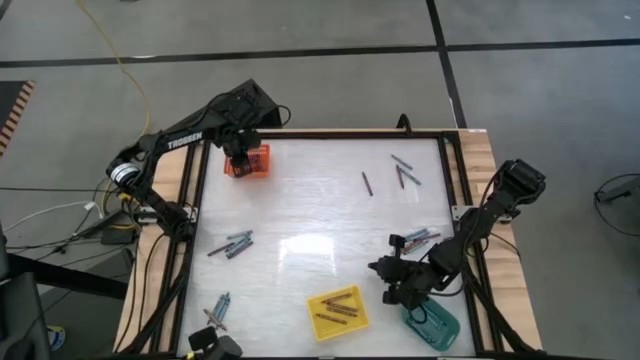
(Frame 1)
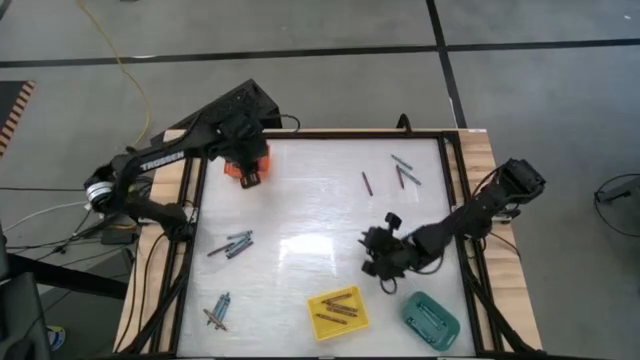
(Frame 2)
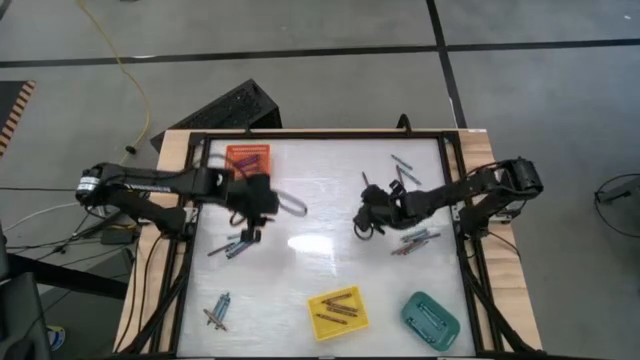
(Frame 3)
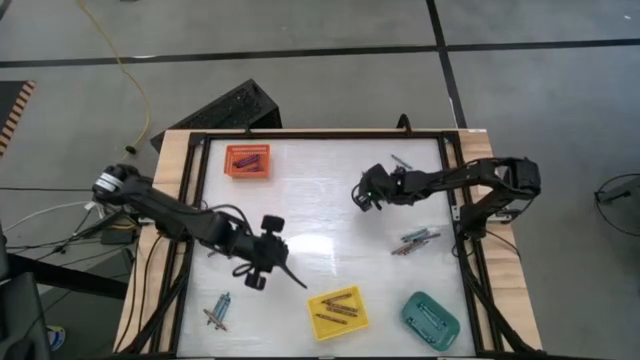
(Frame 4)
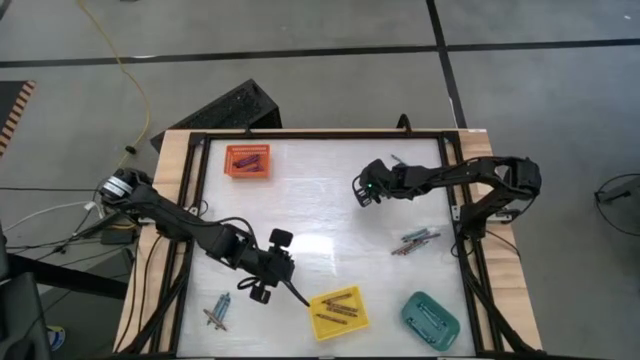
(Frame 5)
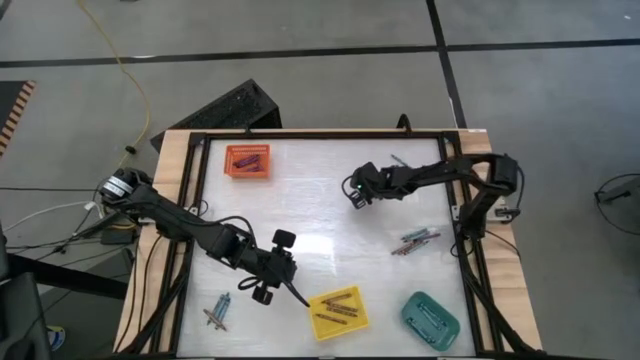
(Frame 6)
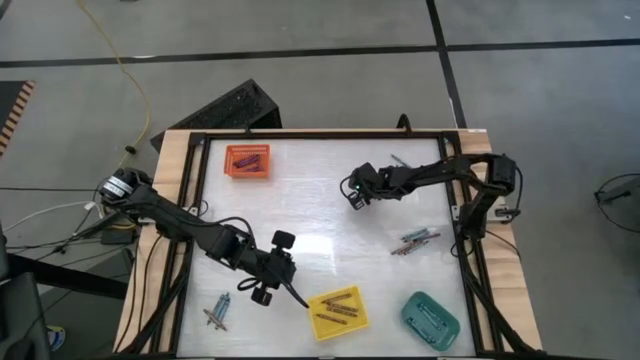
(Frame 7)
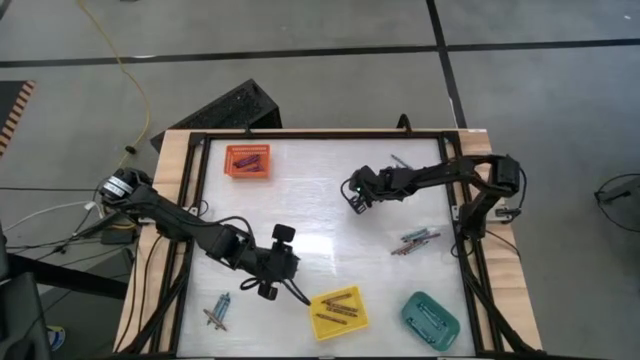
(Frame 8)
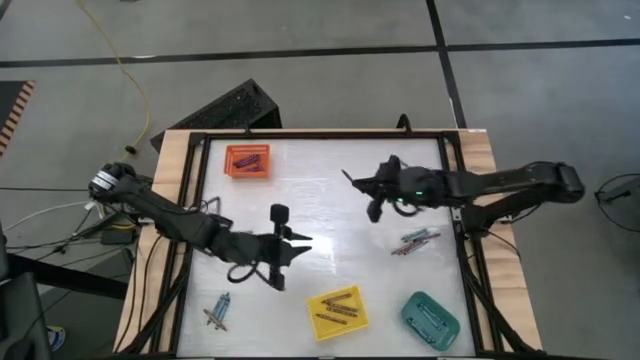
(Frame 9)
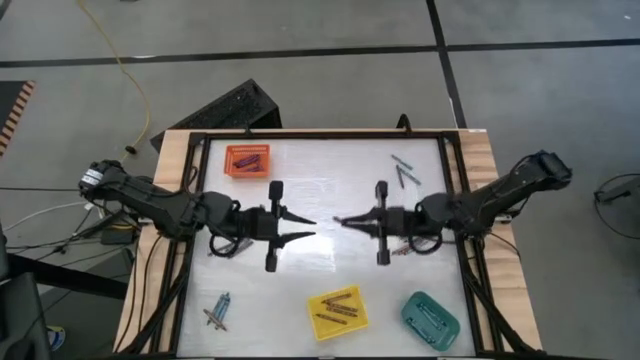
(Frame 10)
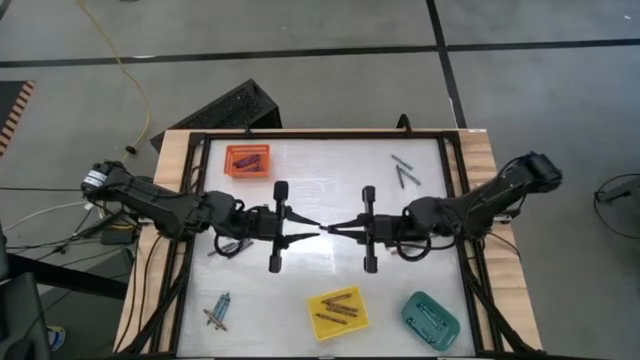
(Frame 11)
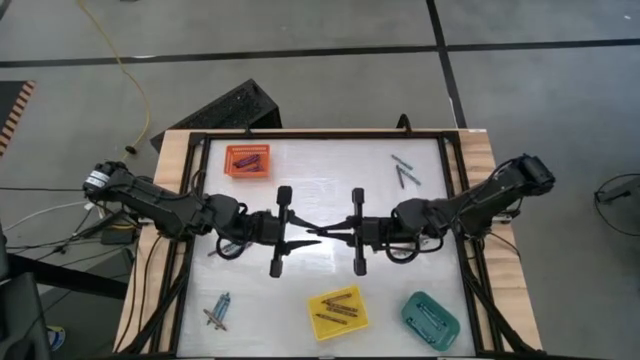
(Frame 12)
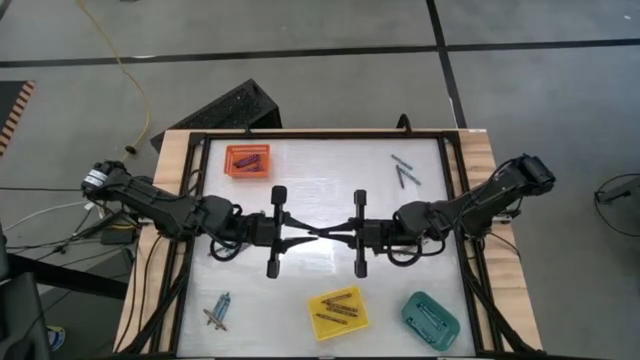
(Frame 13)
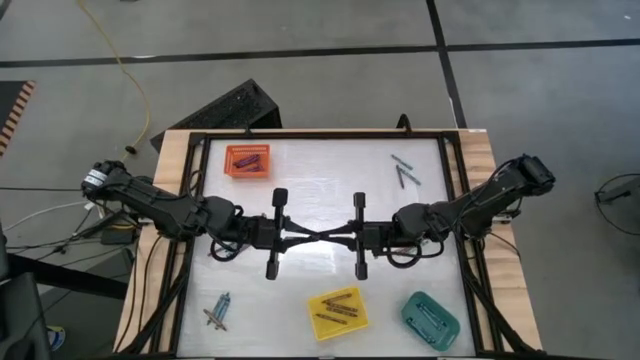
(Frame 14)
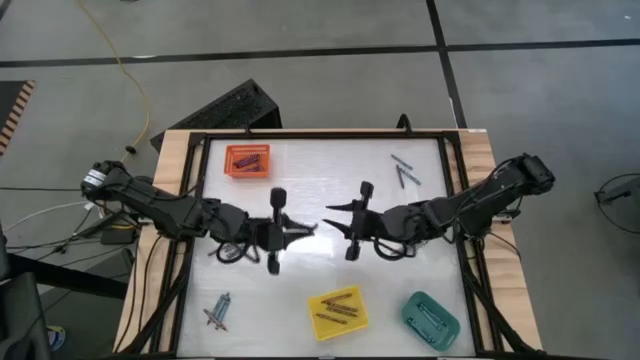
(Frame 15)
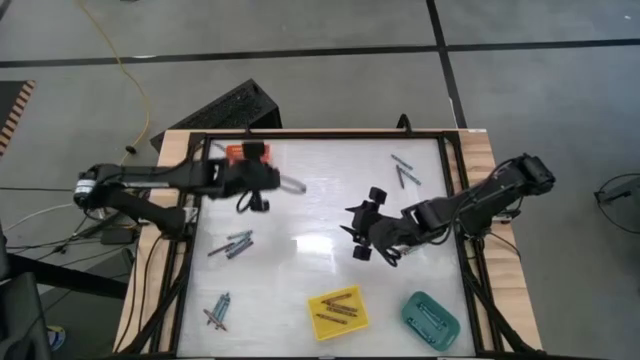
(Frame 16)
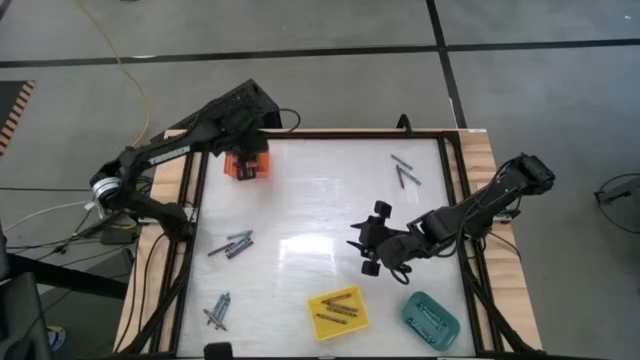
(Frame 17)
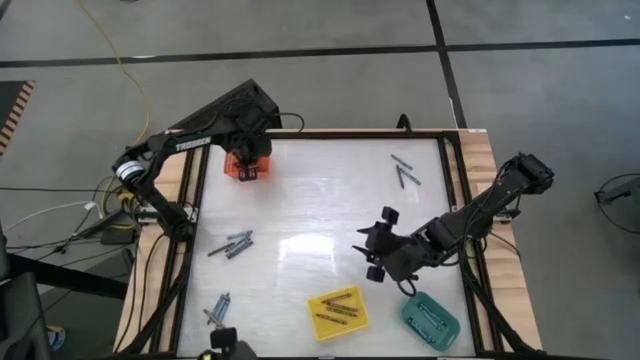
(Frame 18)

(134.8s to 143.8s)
Task: Sort crayons
Put the purple crayon into the orange bin

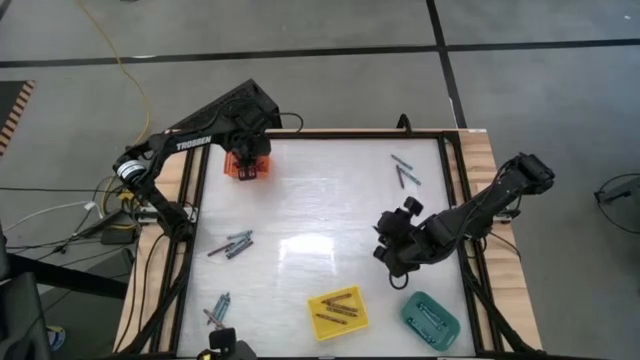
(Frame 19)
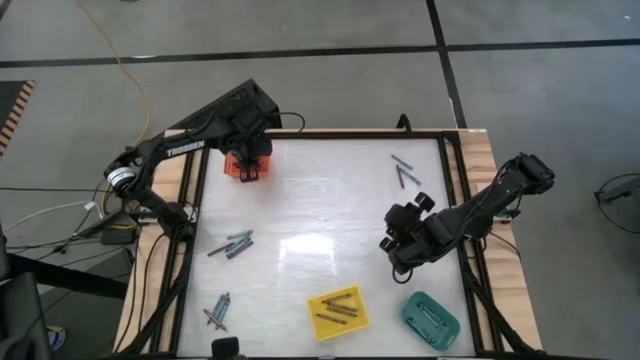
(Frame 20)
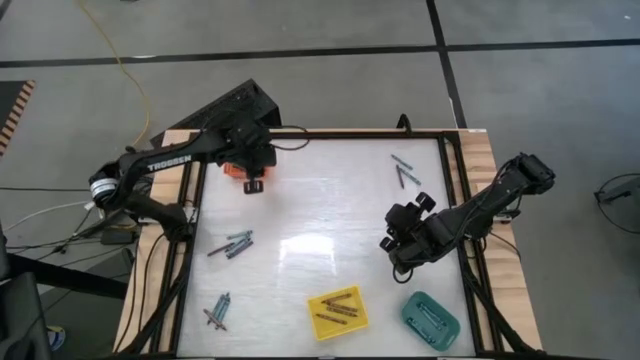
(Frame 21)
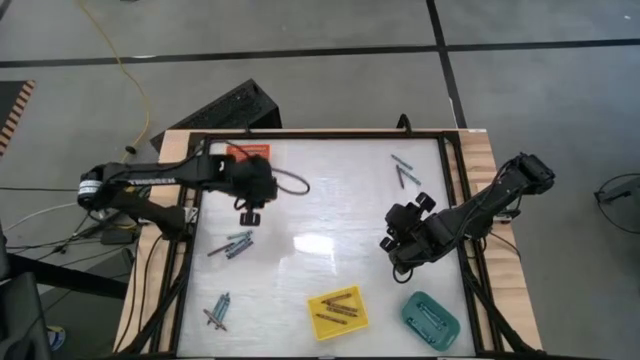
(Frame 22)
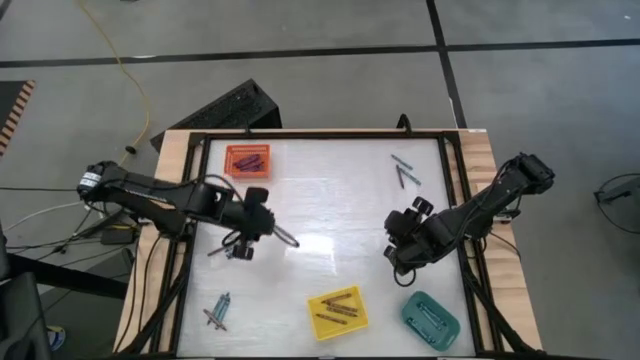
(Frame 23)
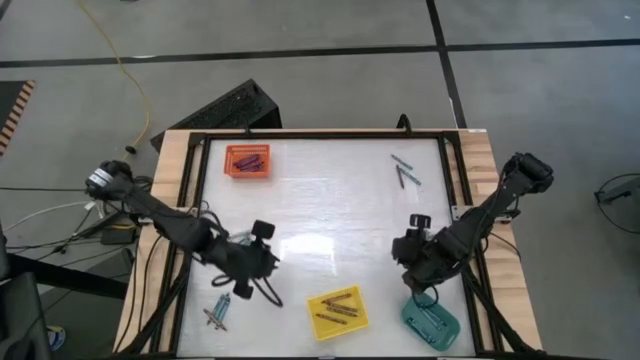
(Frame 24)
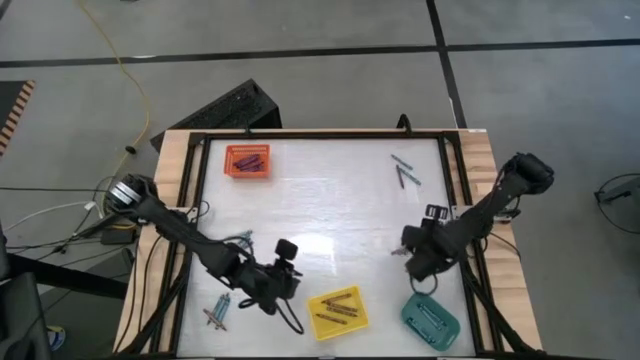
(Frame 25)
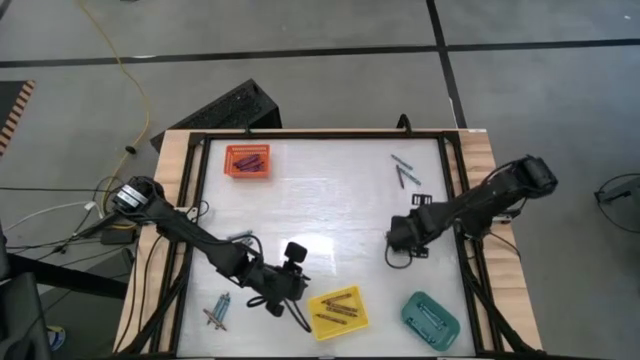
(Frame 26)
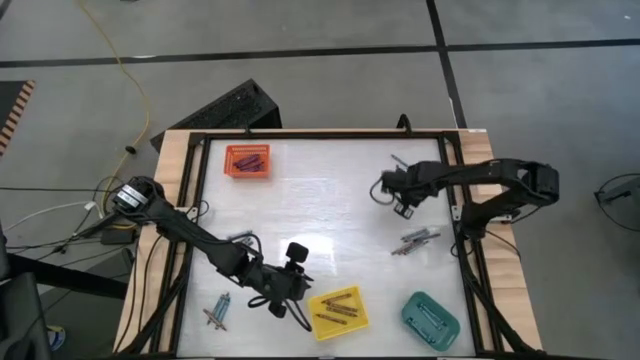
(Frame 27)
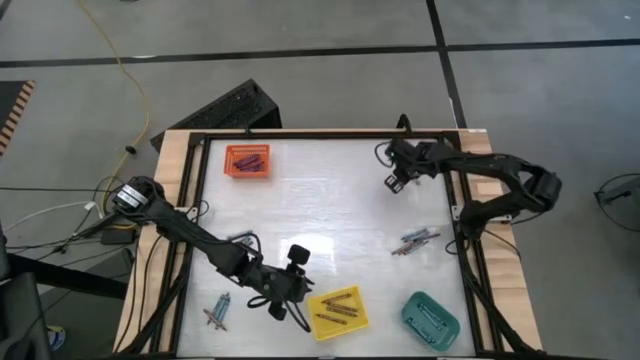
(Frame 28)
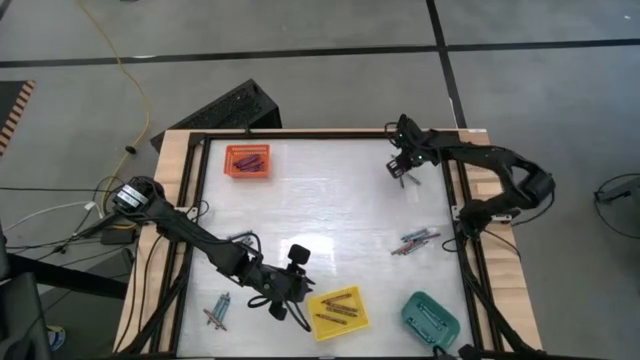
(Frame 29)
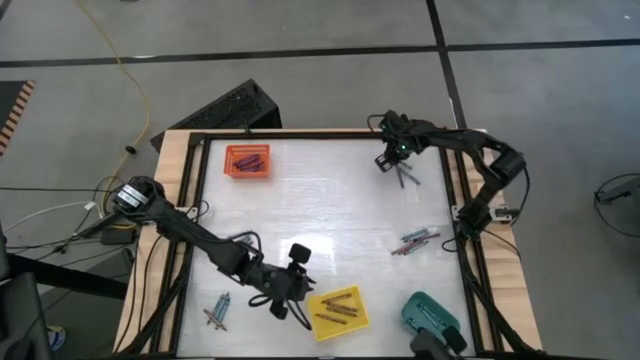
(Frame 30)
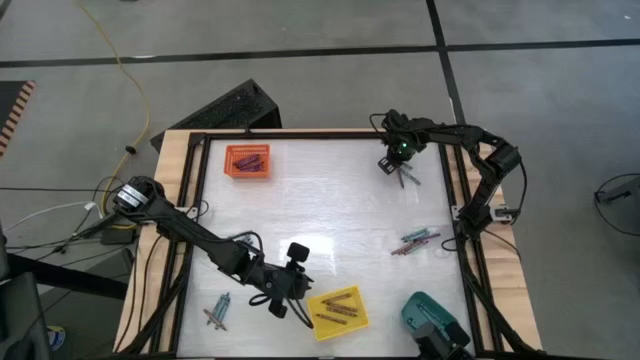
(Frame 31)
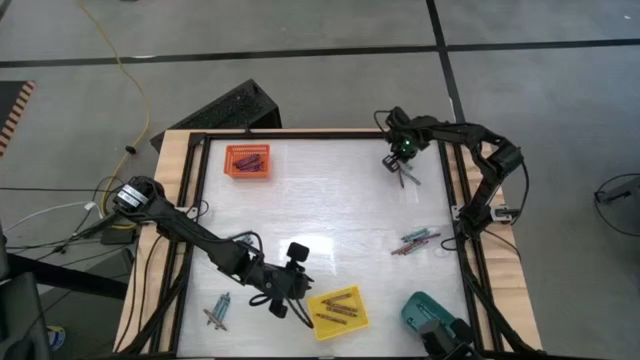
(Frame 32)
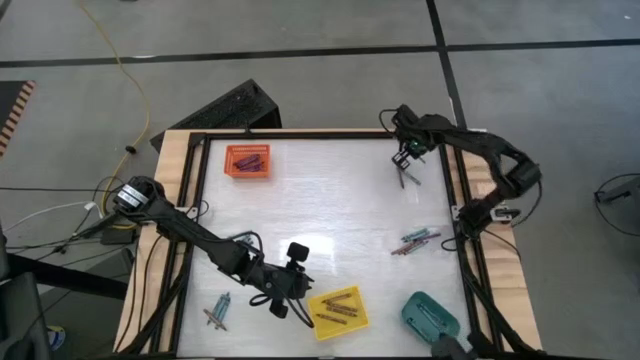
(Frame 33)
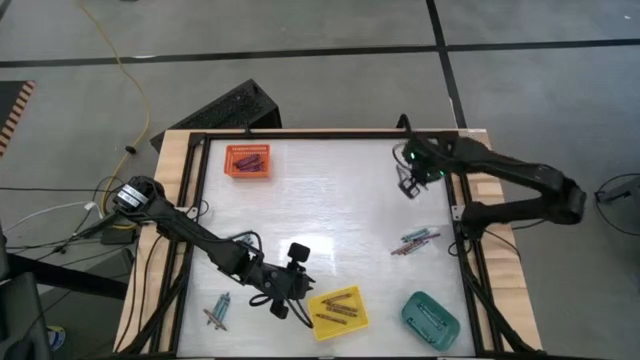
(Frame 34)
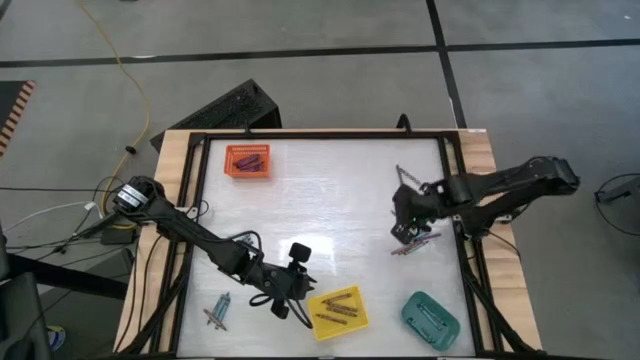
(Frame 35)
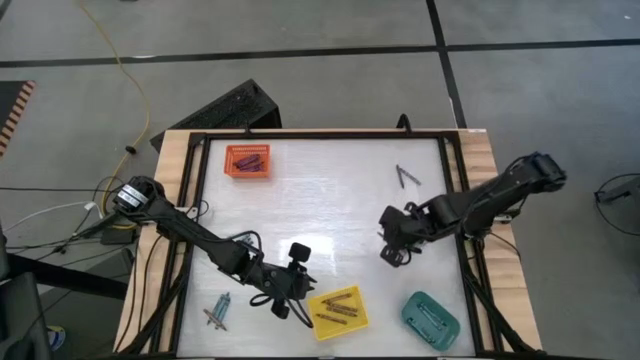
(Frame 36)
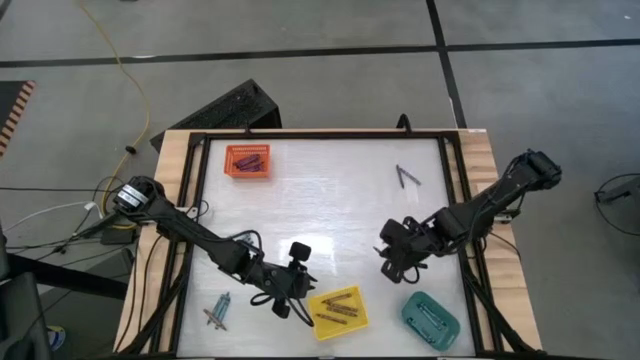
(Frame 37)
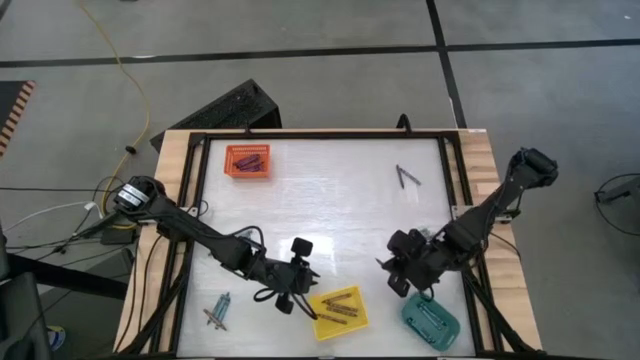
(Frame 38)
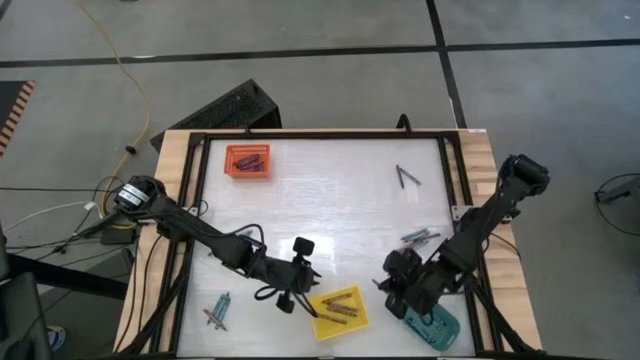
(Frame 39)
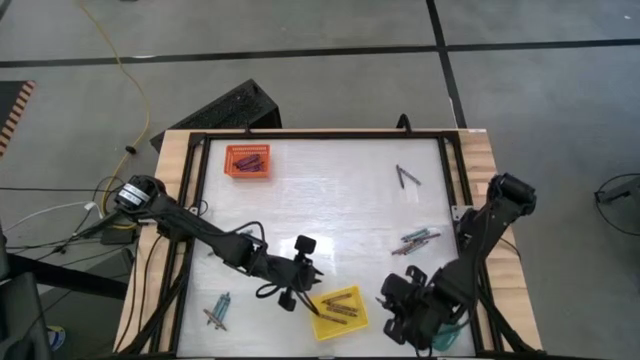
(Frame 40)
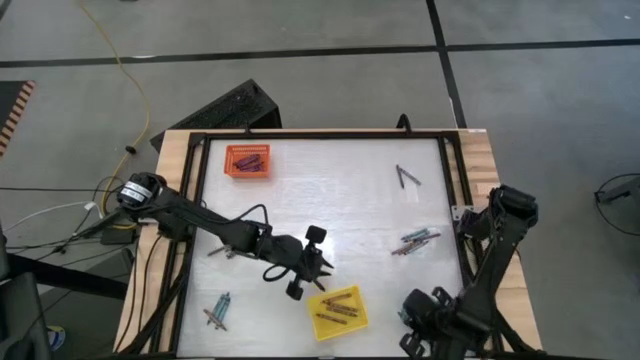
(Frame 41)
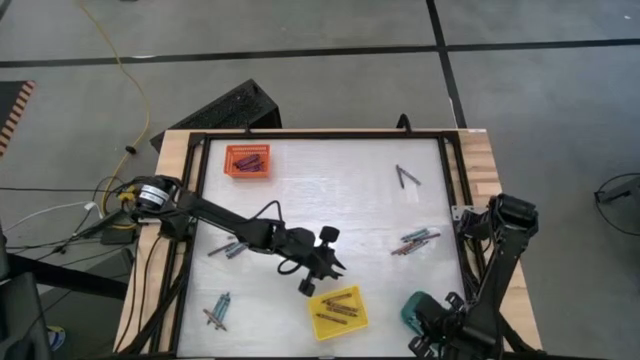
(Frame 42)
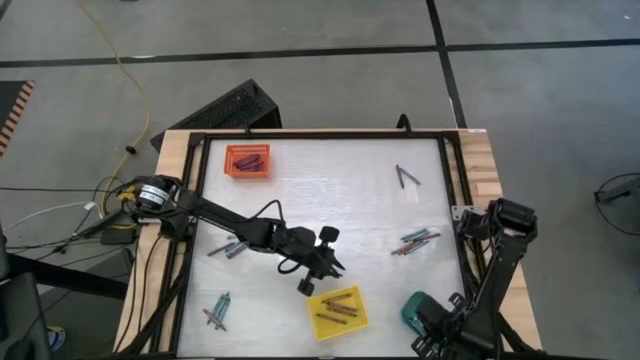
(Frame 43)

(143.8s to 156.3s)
Put the green crayon into the green bin
